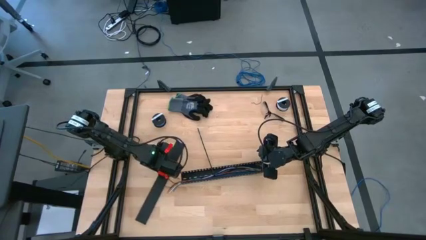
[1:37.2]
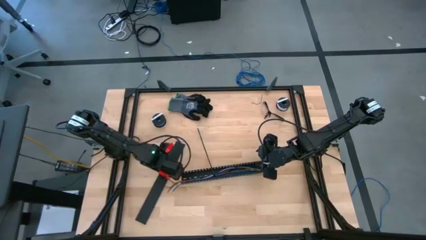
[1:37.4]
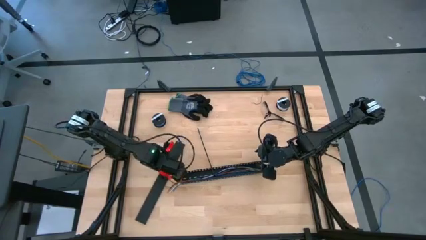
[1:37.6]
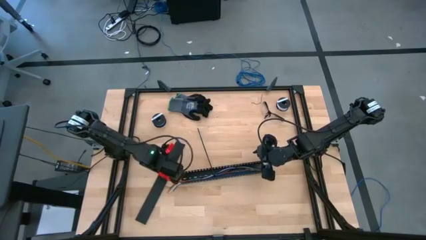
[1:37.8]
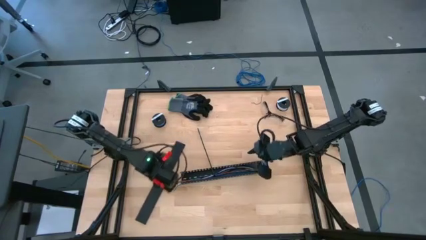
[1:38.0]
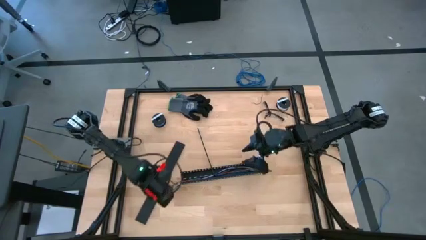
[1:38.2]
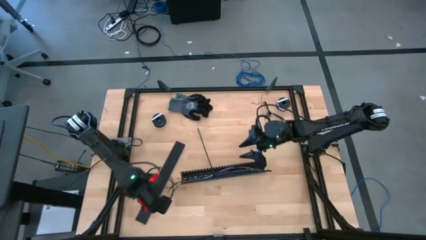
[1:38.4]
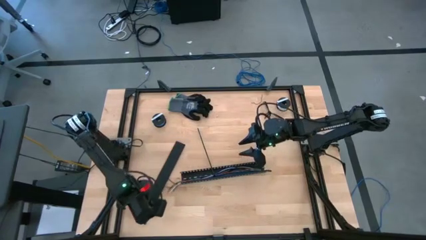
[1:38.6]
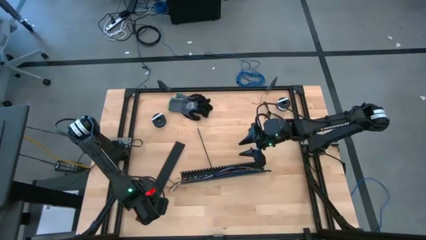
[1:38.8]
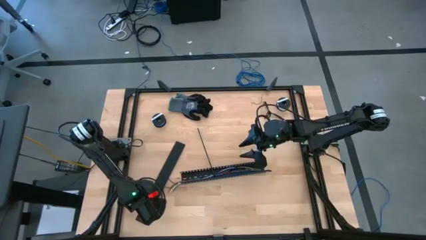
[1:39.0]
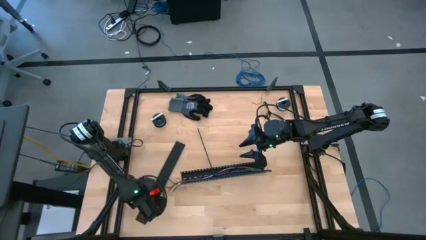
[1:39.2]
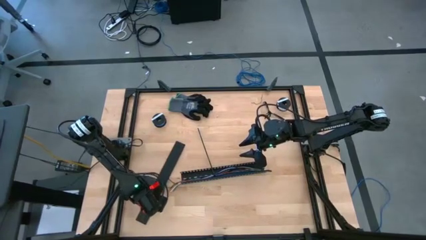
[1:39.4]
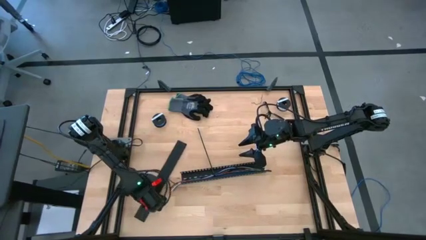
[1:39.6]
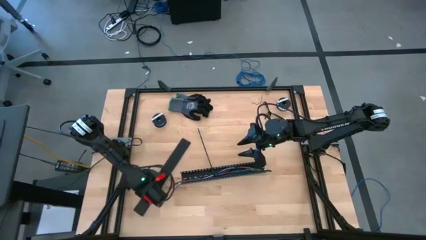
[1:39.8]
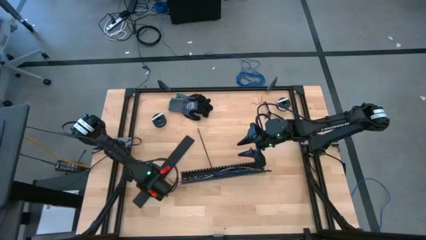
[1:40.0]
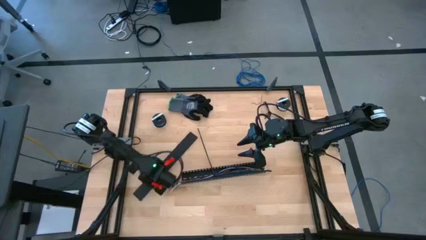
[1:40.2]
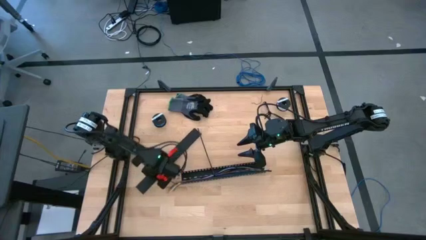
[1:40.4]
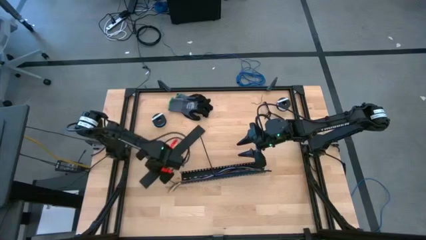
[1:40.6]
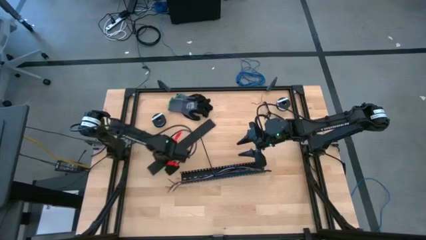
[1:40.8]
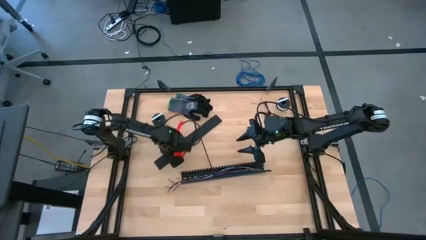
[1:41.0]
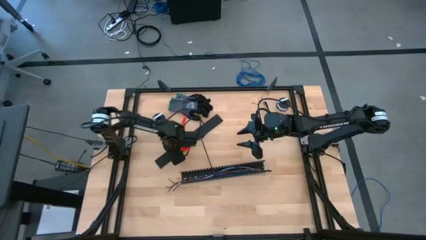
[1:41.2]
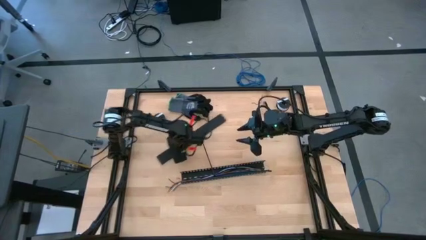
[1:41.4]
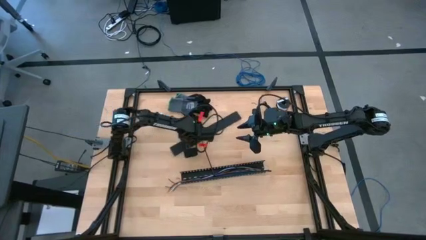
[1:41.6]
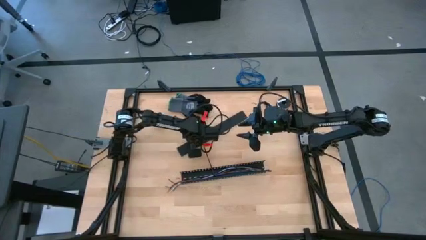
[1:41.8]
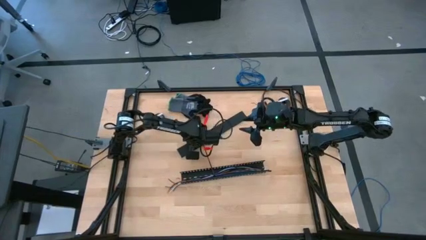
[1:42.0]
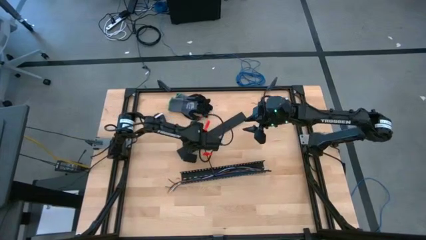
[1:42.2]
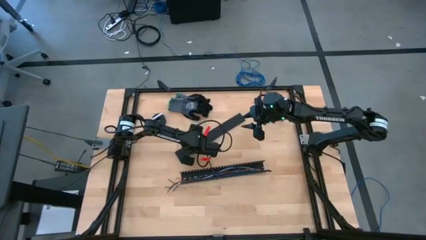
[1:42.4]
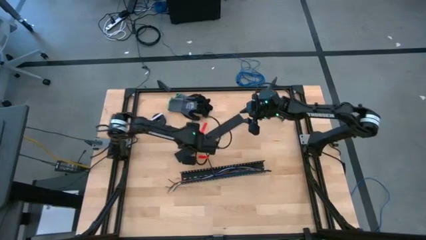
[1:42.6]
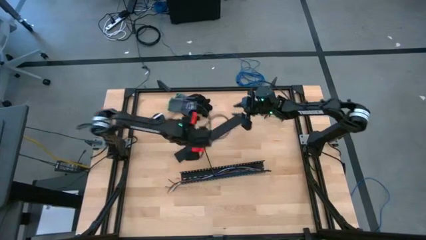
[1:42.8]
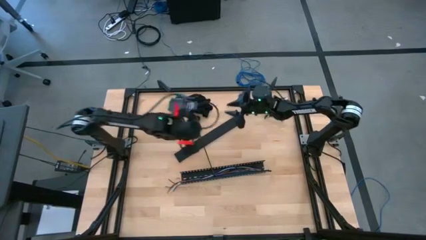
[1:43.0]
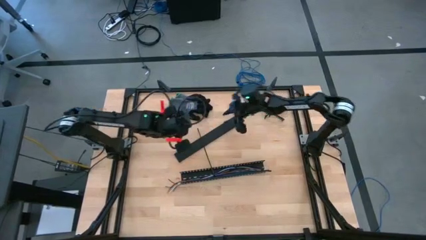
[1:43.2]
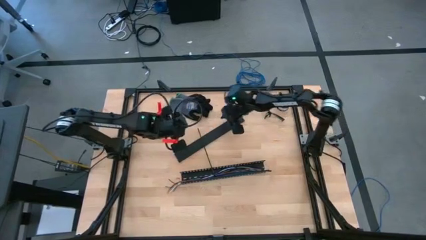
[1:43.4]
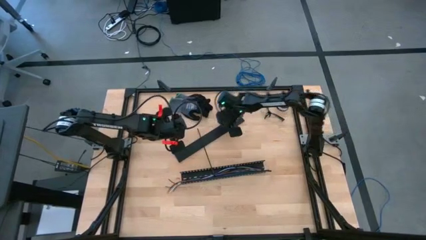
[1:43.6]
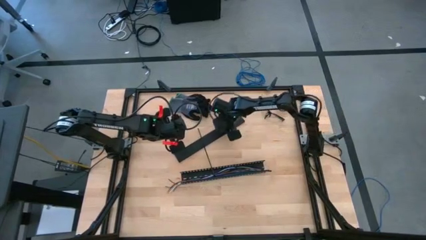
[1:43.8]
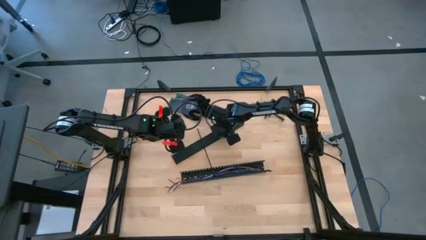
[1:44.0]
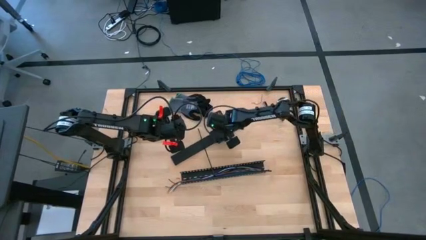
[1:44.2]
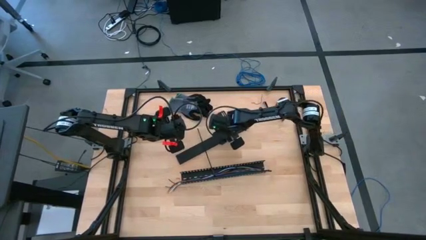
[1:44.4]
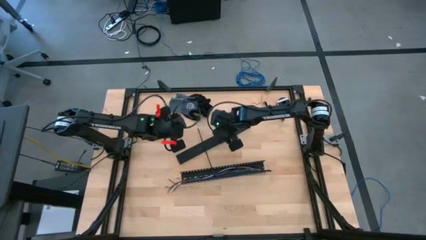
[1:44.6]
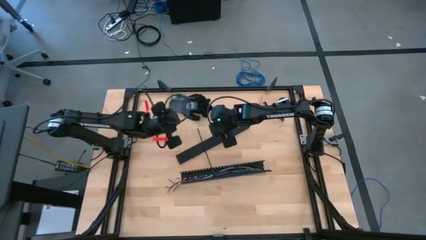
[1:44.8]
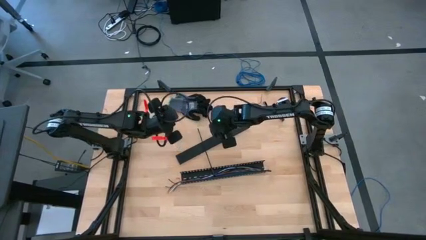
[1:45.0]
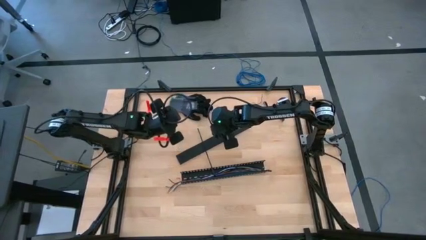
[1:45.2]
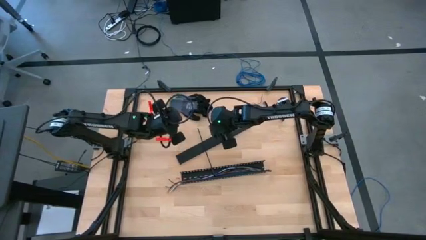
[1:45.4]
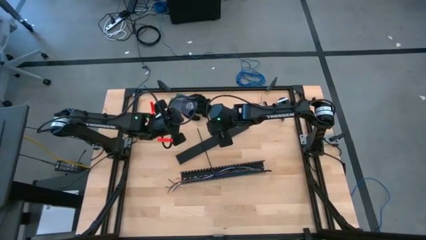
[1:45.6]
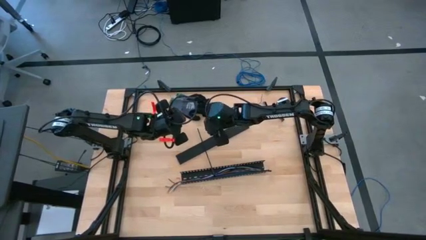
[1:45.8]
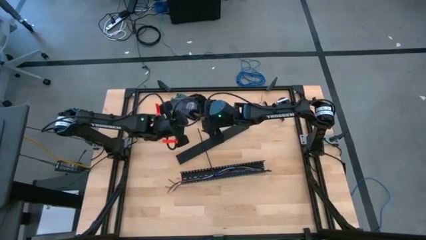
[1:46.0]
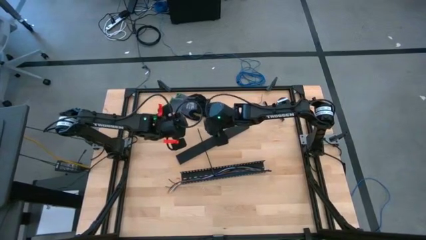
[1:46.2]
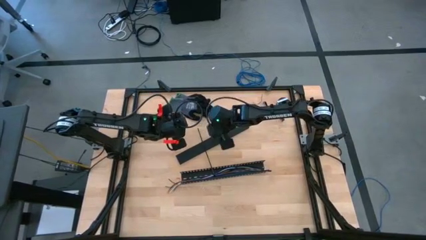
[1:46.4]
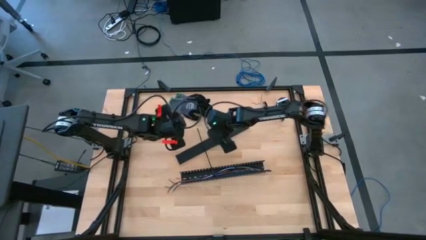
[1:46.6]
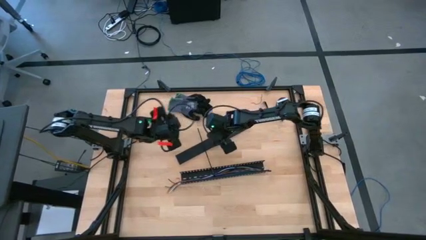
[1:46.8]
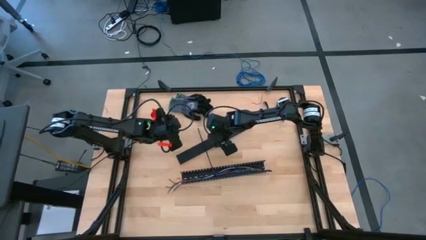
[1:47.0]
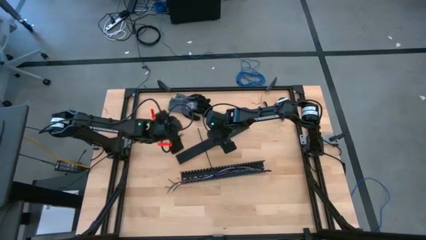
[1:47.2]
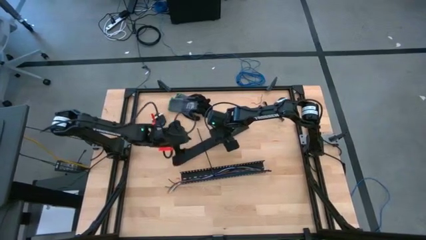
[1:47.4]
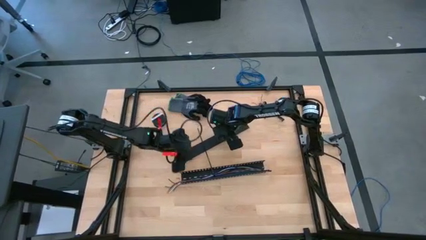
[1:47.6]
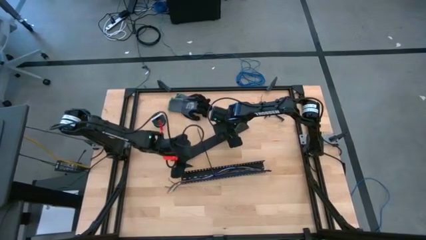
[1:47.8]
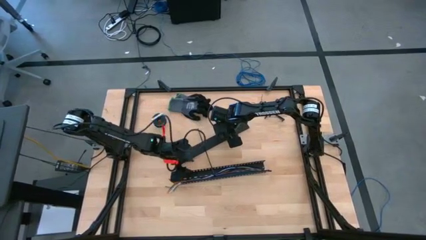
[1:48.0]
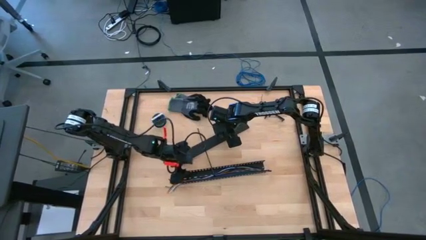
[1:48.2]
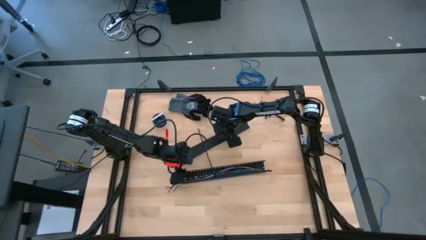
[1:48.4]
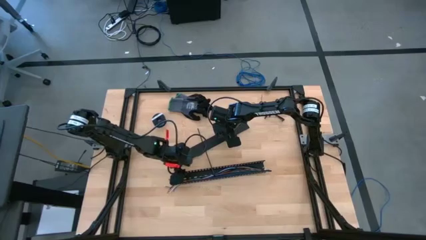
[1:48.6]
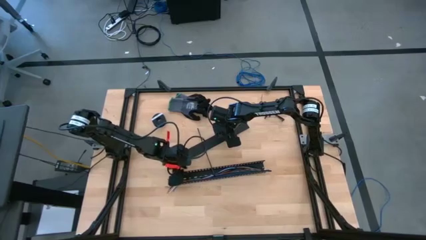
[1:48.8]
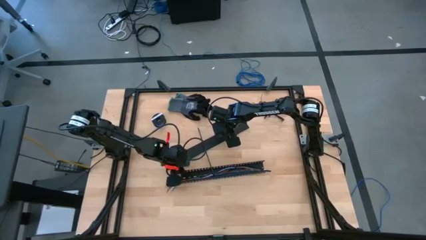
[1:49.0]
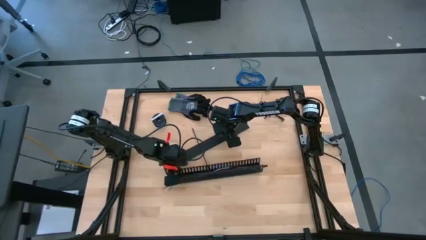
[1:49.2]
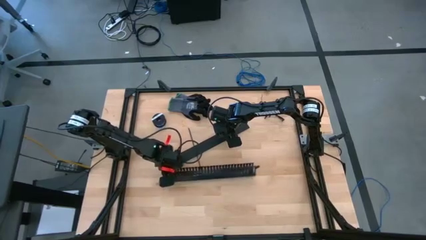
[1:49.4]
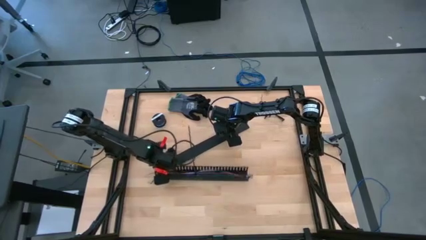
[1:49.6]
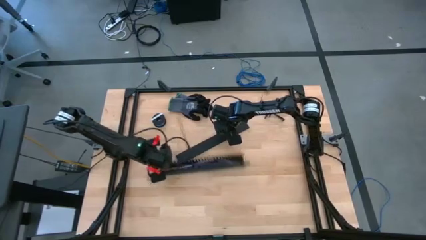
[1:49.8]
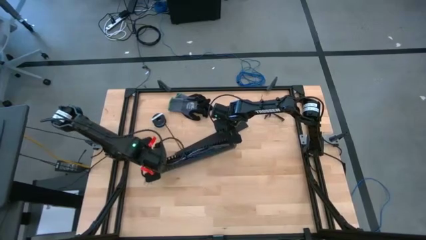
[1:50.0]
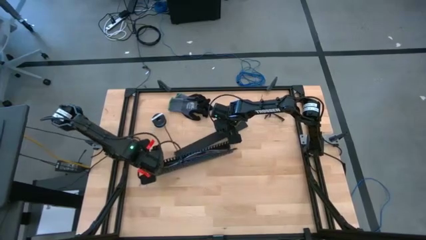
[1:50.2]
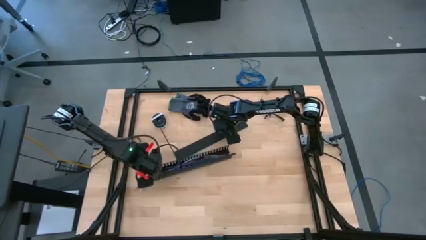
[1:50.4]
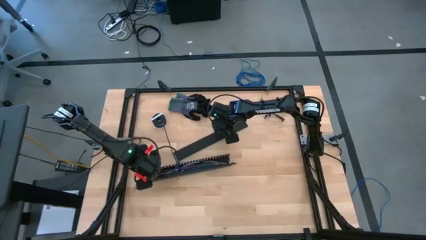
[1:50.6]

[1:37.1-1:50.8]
Task: Ziptie cables
Close the black cable duct

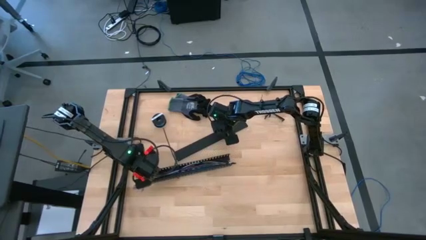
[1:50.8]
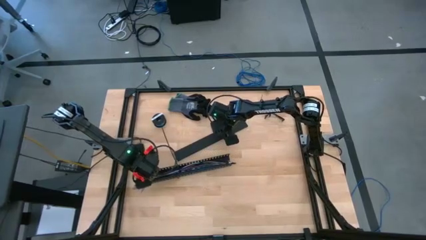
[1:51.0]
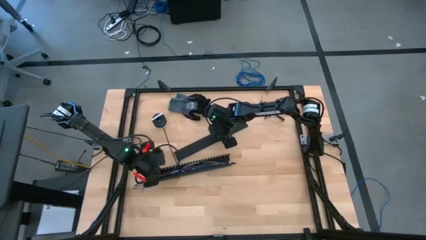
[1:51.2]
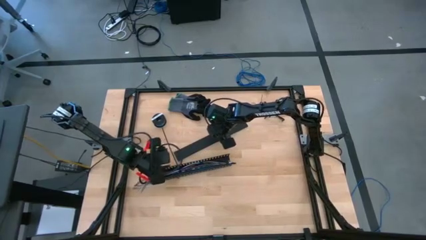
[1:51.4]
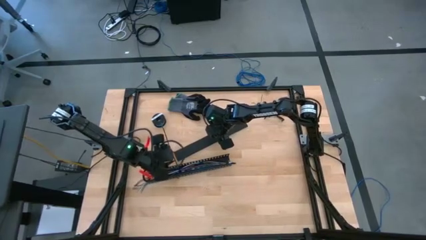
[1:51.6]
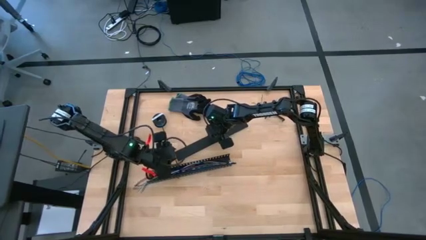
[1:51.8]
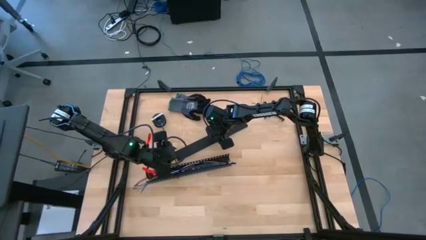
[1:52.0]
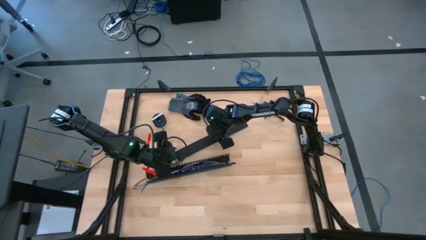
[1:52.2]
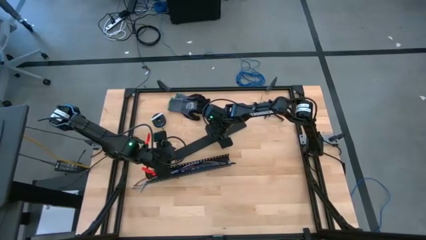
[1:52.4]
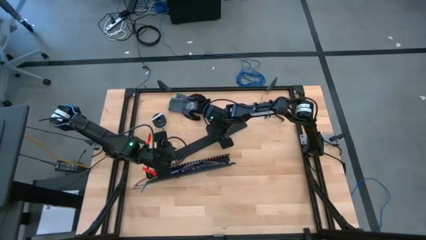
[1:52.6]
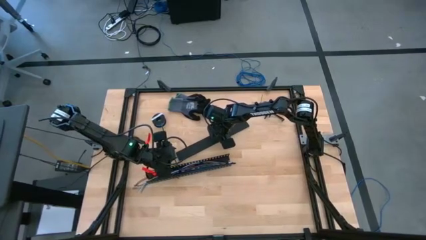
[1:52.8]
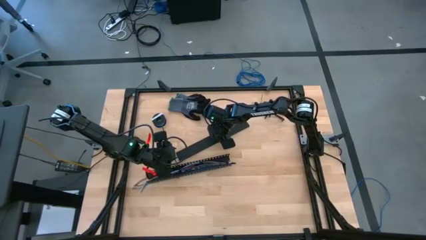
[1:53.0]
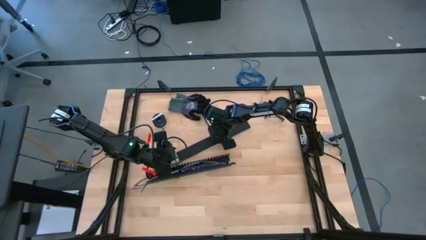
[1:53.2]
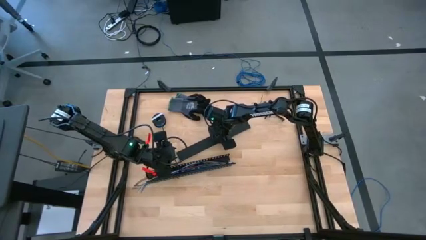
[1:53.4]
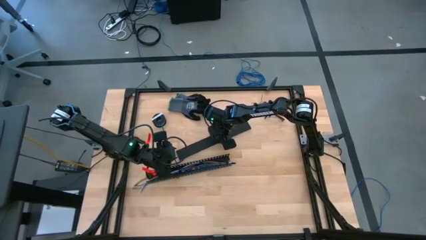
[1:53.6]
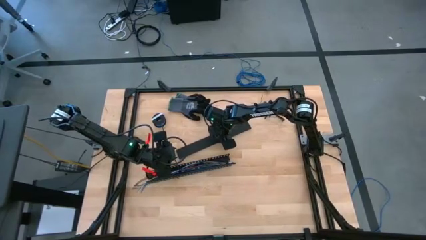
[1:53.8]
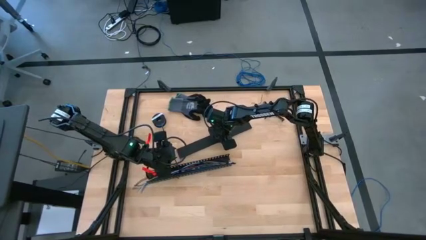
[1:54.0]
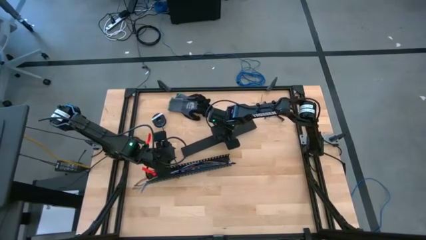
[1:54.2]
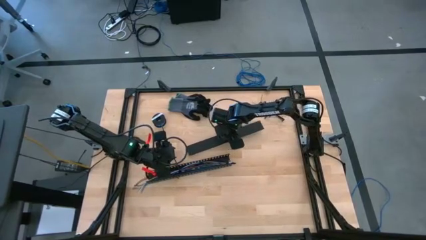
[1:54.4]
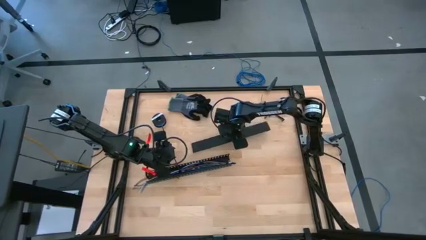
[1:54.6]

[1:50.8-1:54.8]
Close the black cable duct
